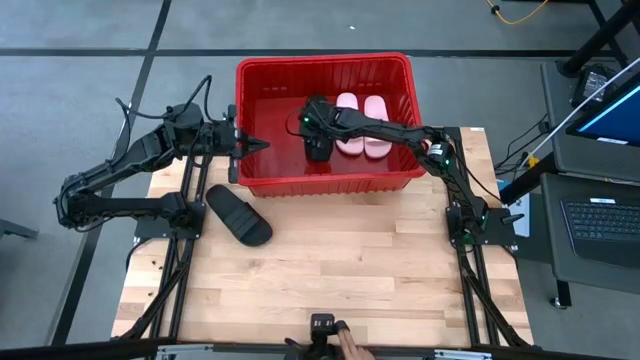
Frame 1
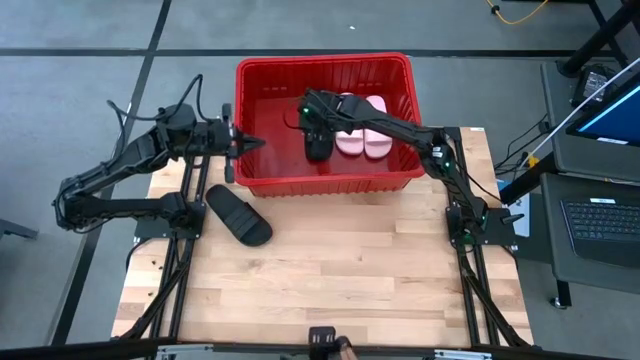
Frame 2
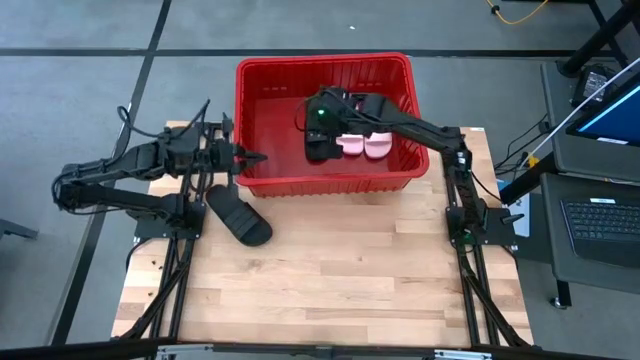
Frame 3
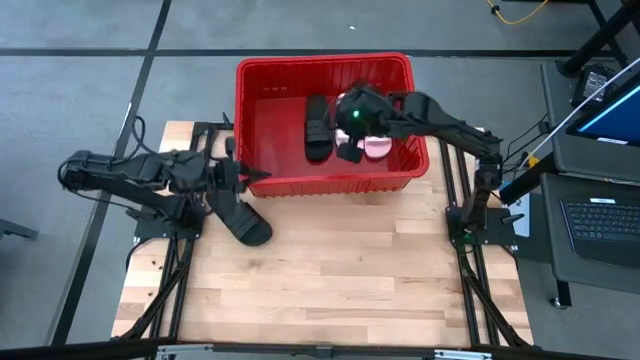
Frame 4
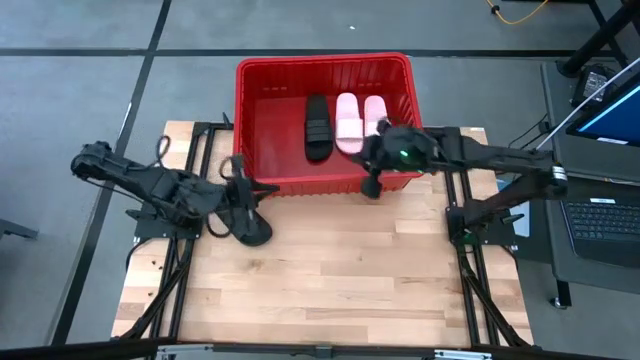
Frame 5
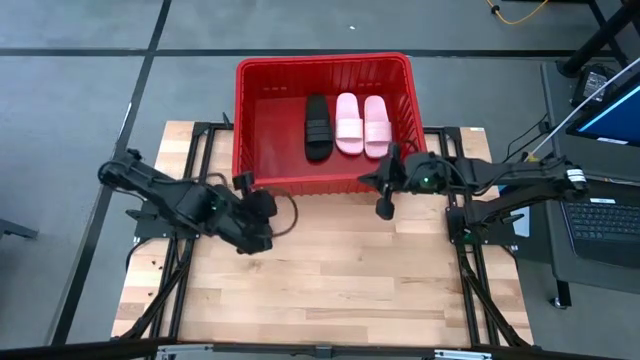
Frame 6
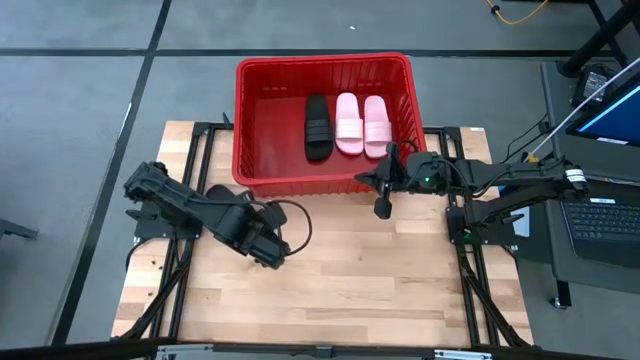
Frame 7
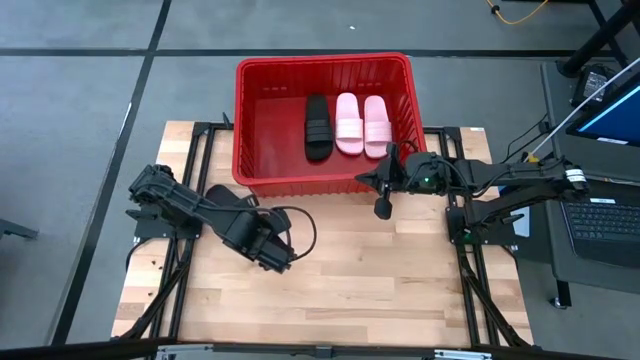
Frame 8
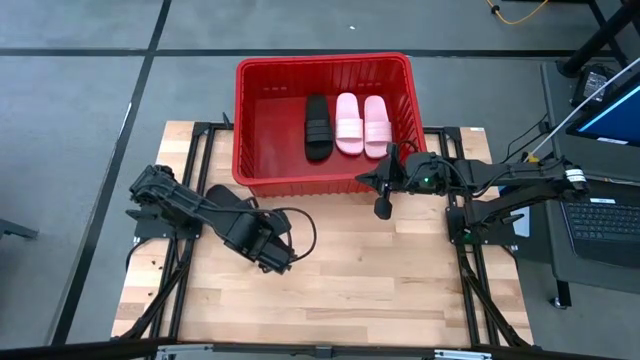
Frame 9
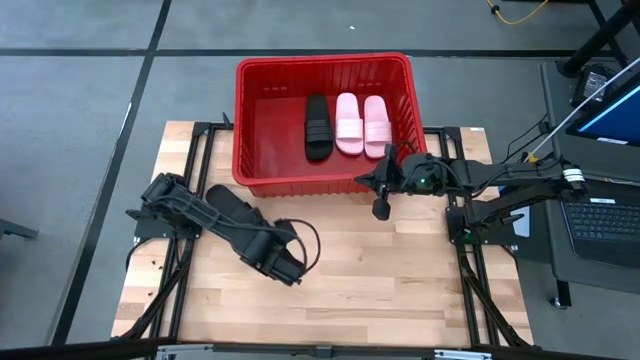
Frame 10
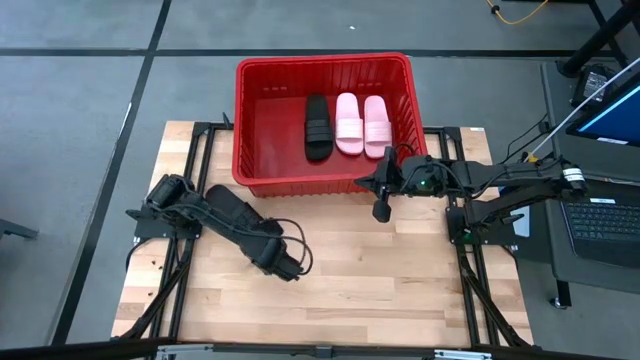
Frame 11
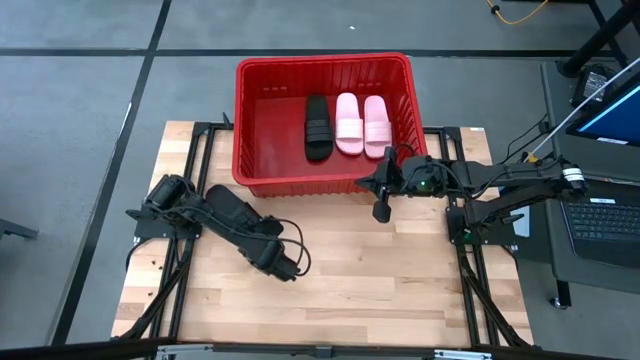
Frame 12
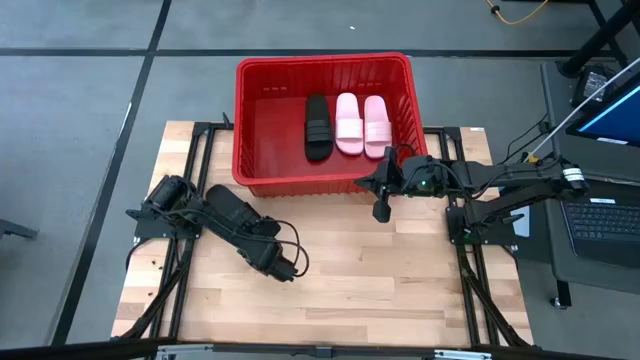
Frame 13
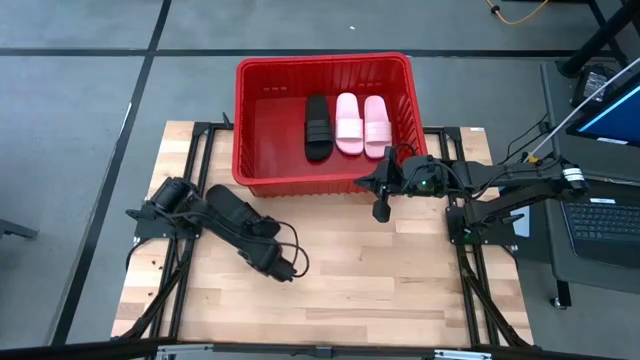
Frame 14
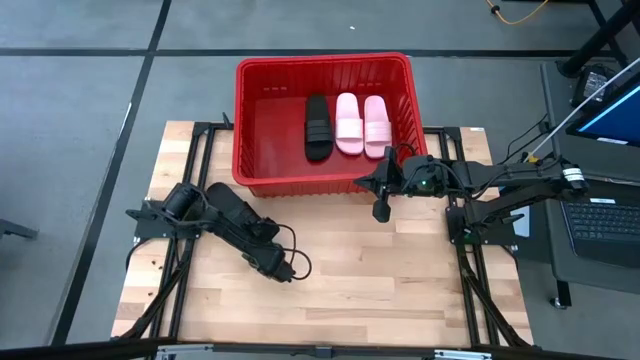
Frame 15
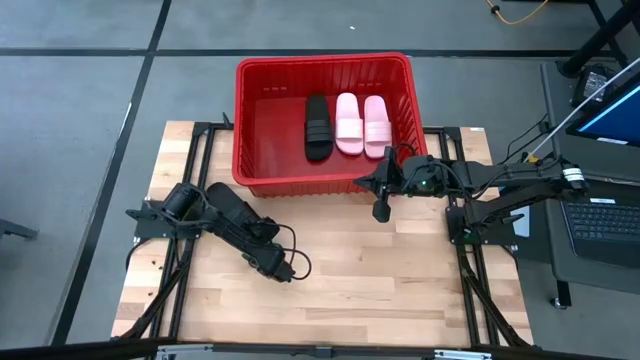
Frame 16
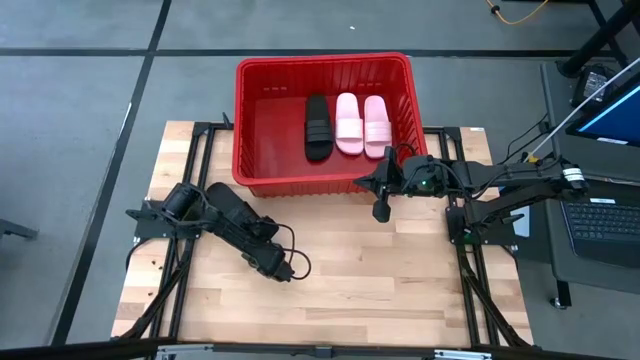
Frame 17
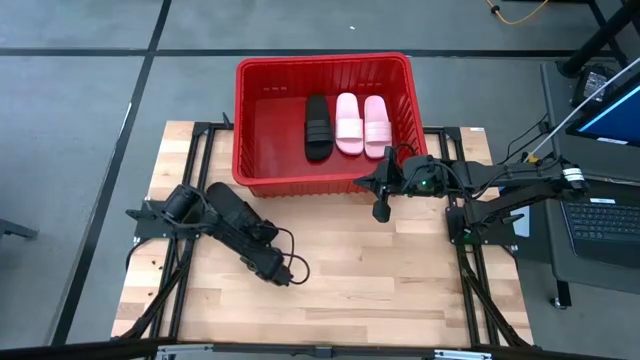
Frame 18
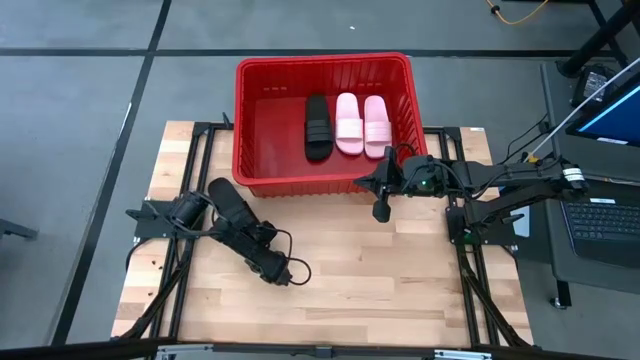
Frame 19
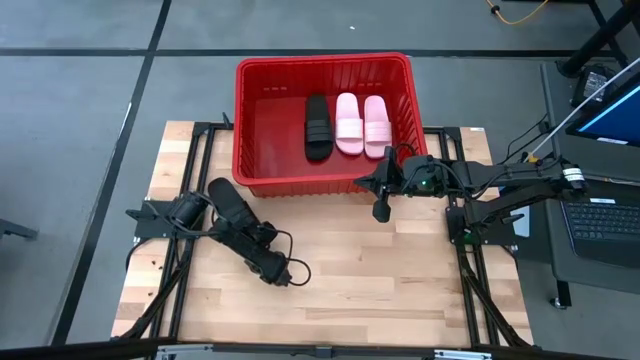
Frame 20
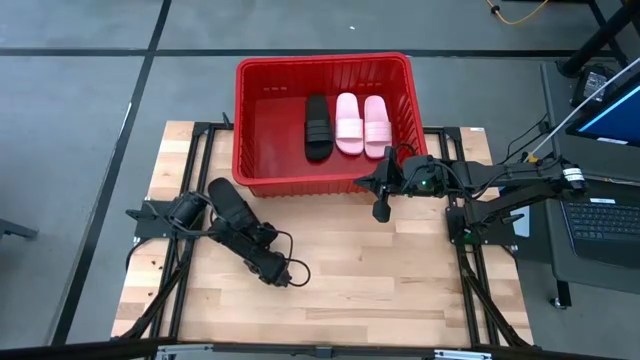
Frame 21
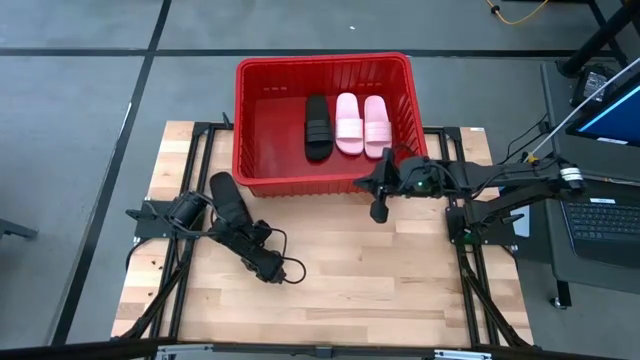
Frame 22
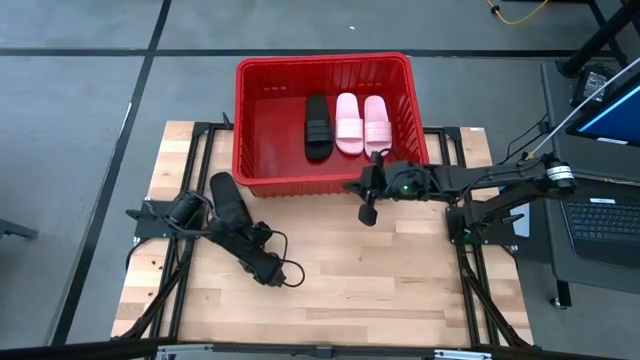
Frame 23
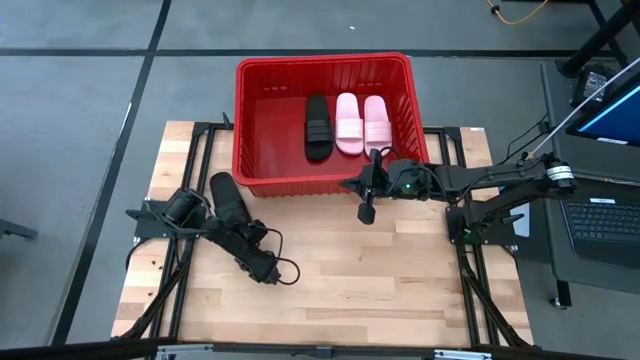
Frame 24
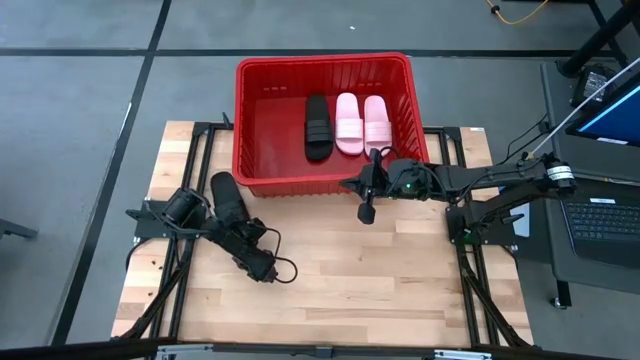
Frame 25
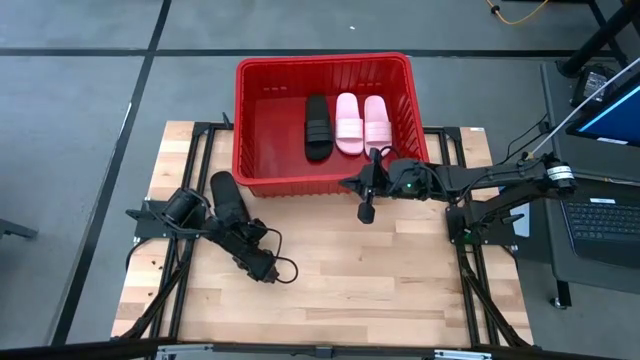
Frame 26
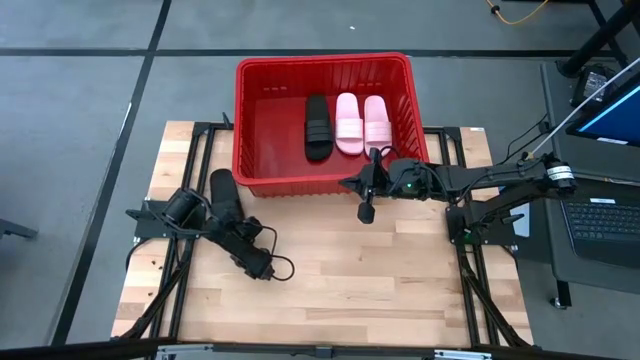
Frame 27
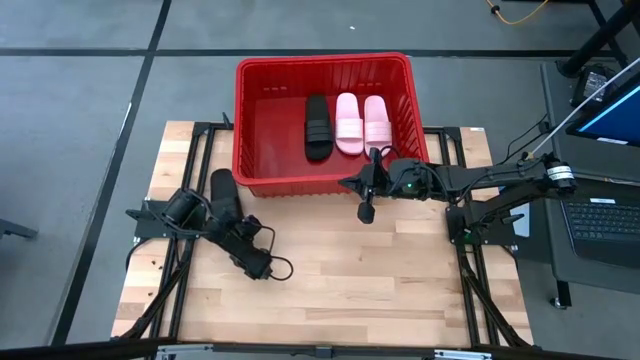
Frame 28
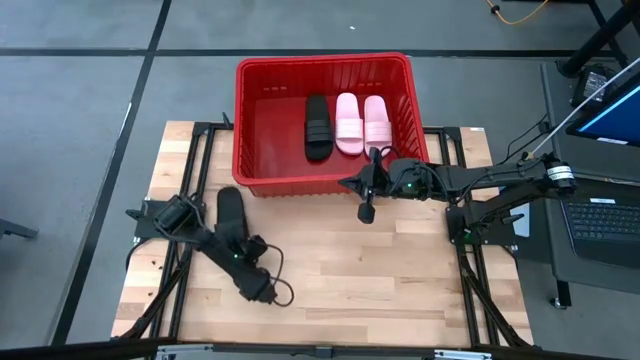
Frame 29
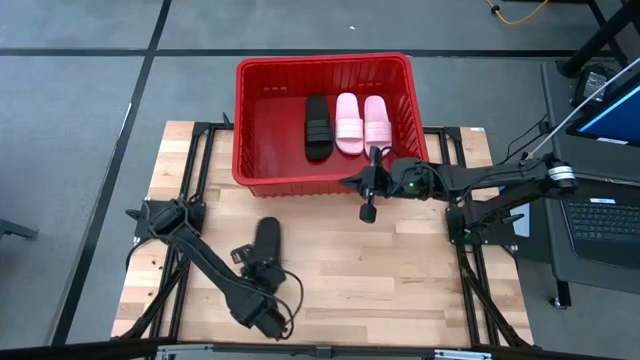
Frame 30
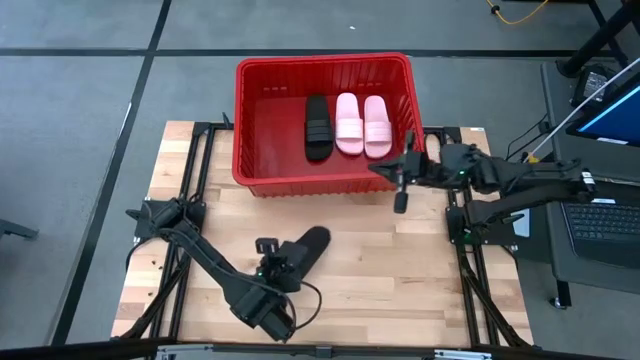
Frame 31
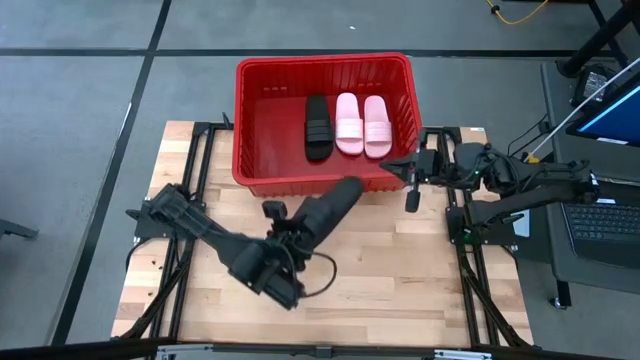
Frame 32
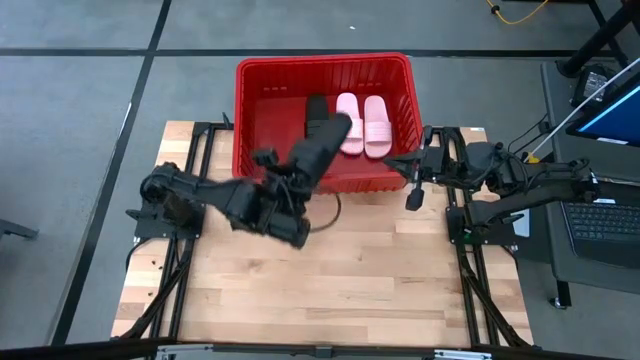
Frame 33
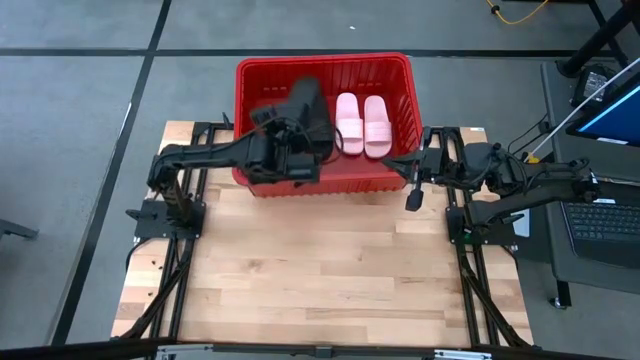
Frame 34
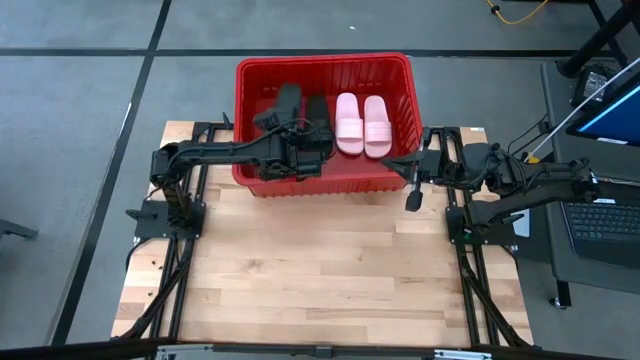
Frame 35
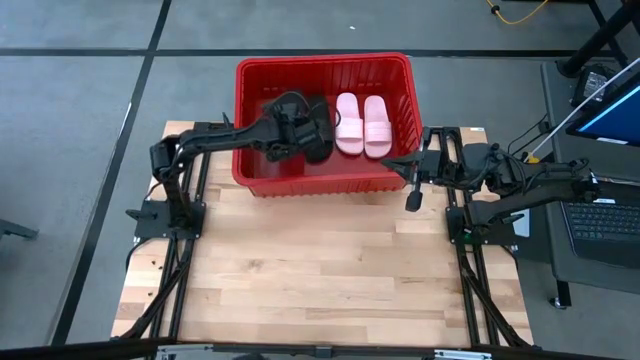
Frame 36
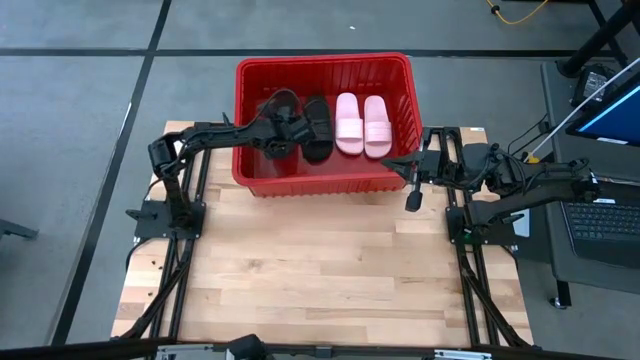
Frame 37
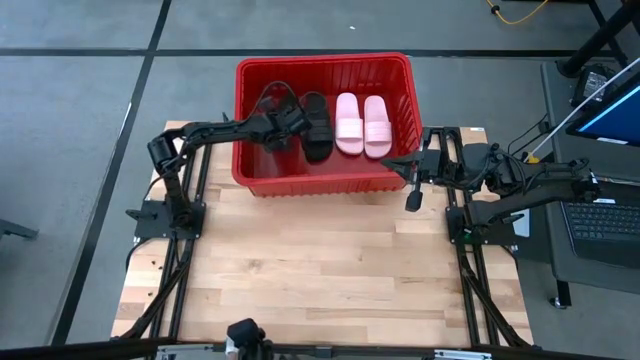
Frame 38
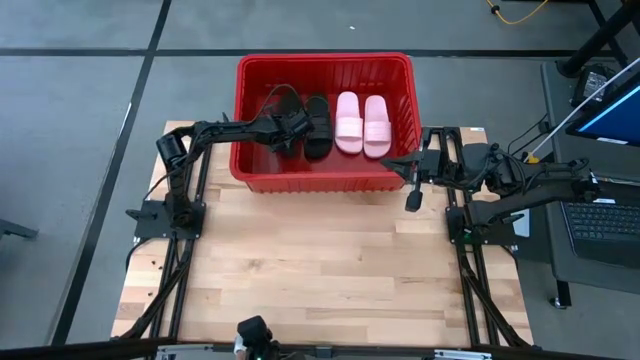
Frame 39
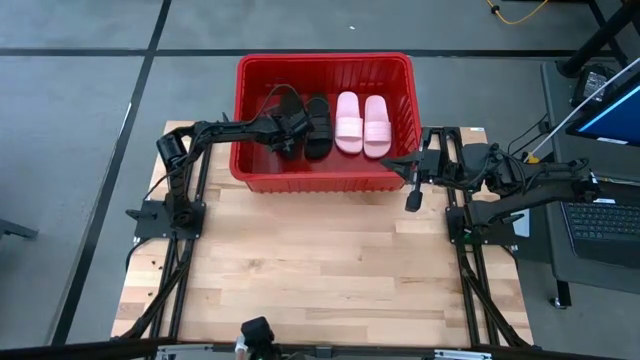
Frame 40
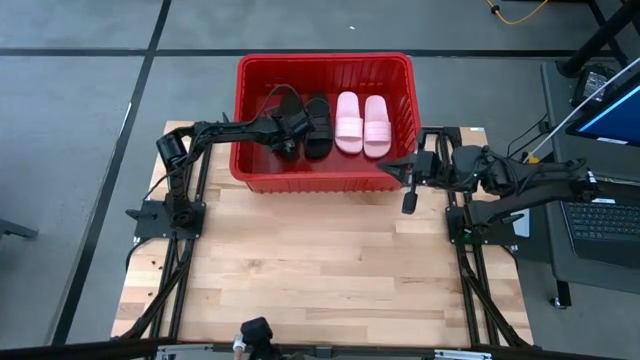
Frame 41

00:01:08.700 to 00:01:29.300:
Task: Pick and place slides into bin
Put the black slipper into the red bin

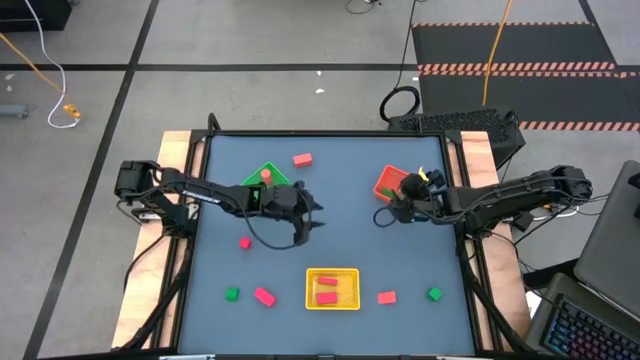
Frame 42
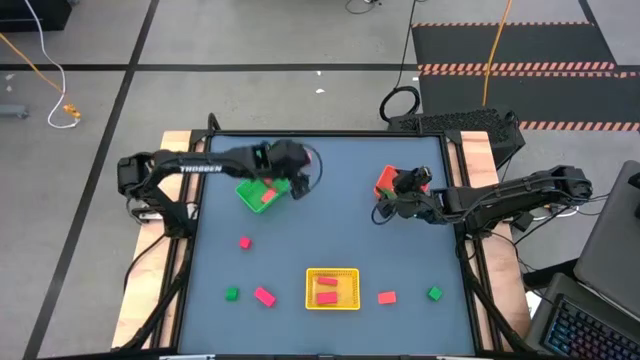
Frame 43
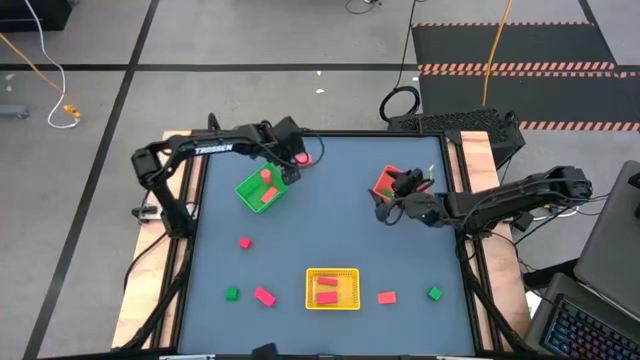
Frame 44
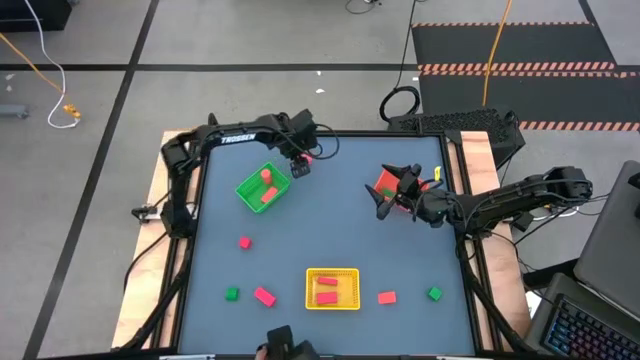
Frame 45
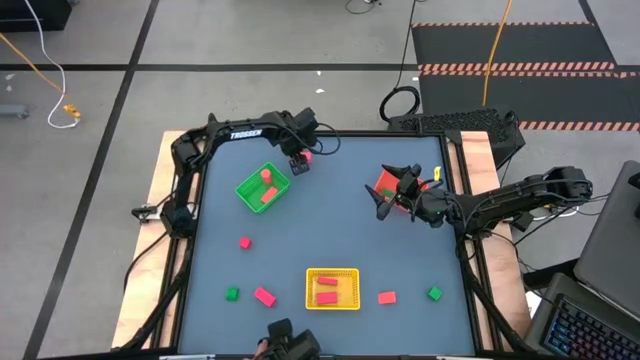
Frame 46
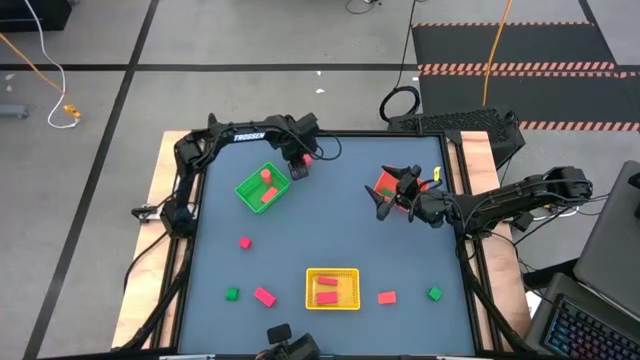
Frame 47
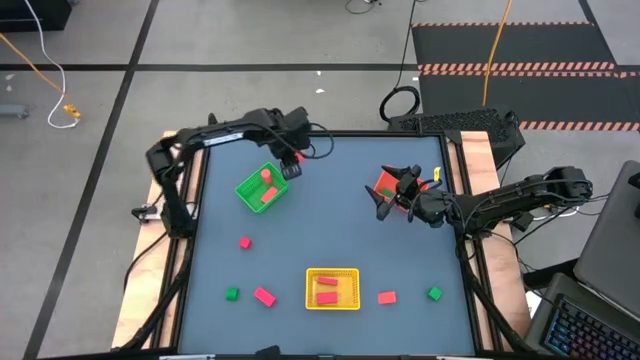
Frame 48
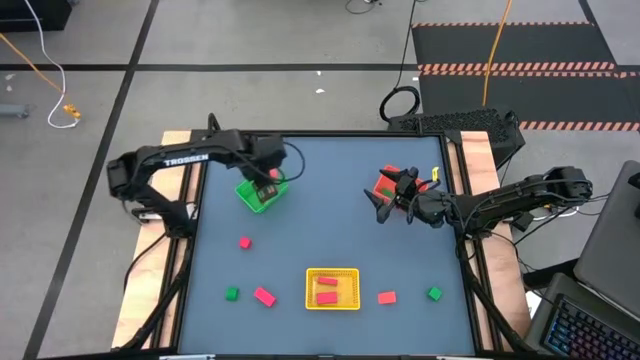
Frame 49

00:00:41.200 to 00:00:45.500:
Task: Sort & place blocks by color
Put the orange block into the green bin
